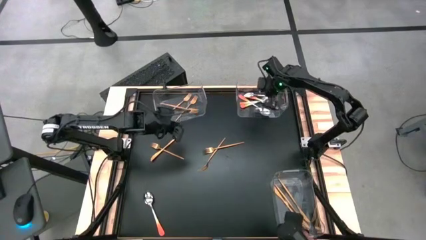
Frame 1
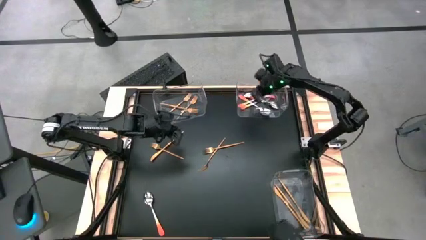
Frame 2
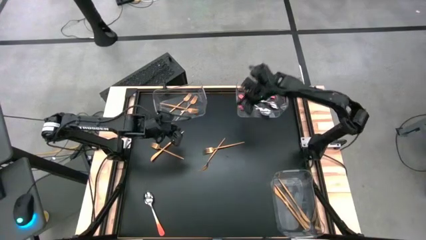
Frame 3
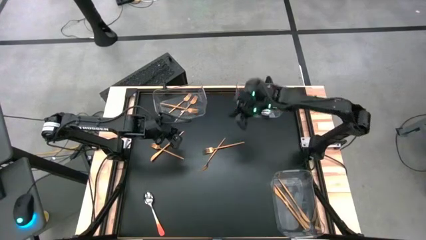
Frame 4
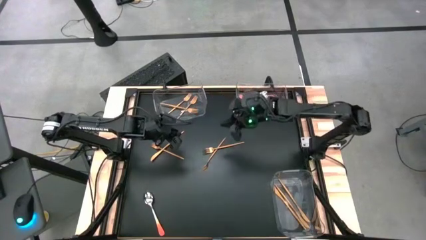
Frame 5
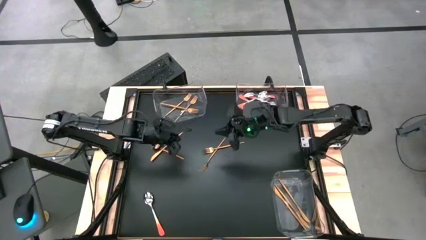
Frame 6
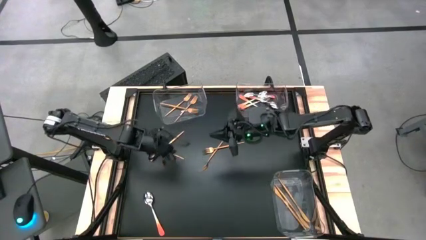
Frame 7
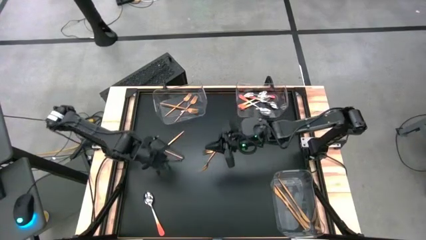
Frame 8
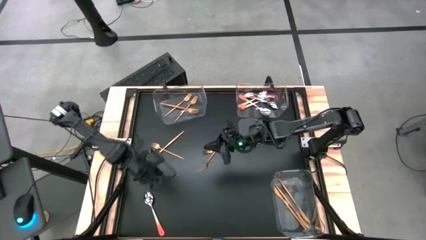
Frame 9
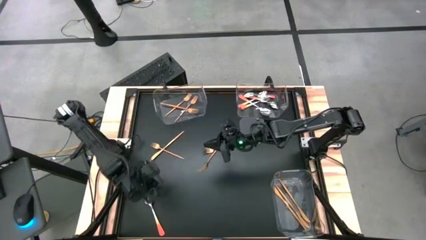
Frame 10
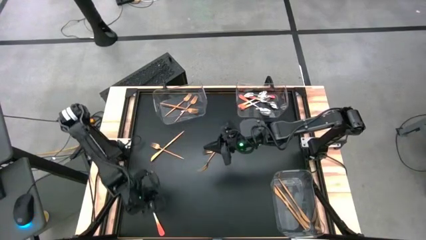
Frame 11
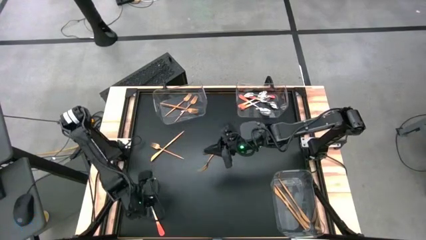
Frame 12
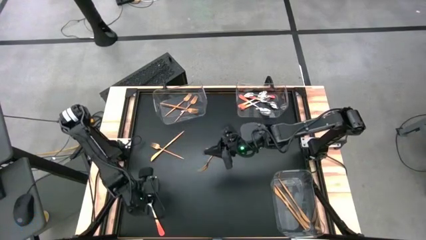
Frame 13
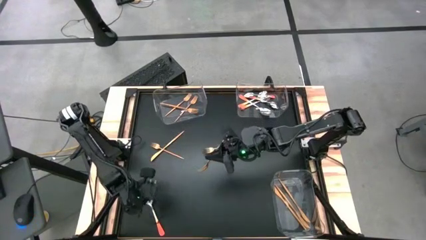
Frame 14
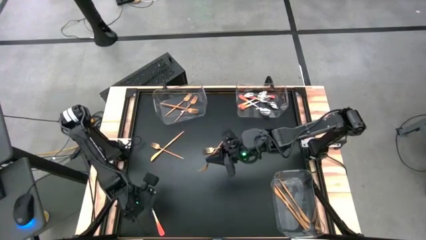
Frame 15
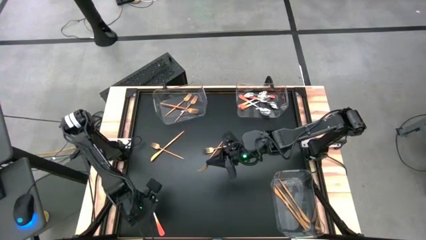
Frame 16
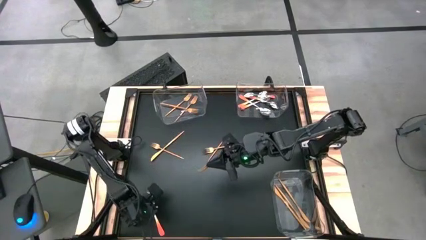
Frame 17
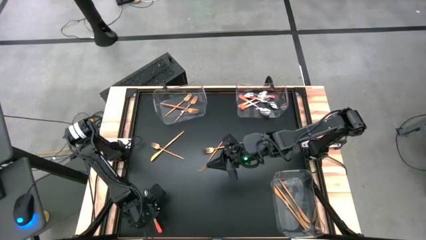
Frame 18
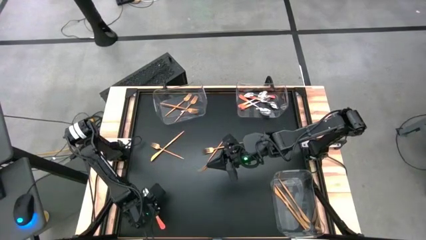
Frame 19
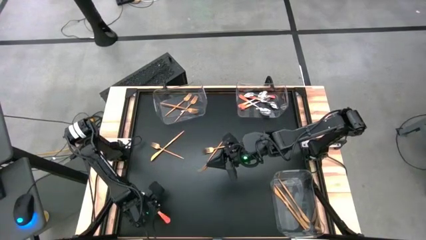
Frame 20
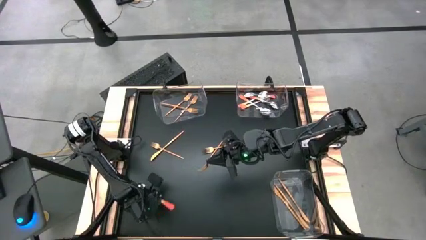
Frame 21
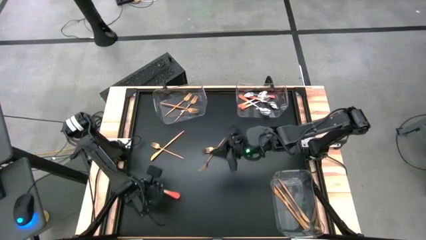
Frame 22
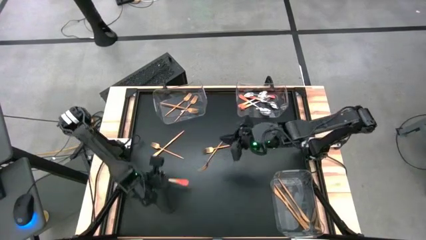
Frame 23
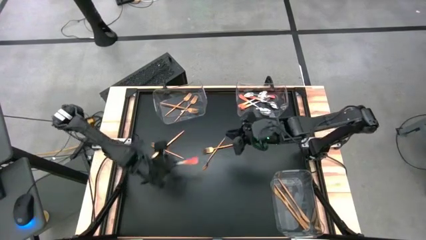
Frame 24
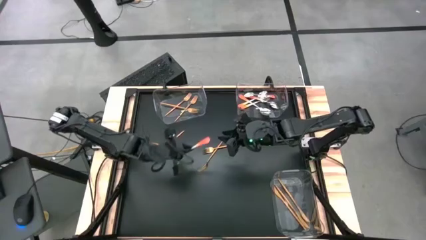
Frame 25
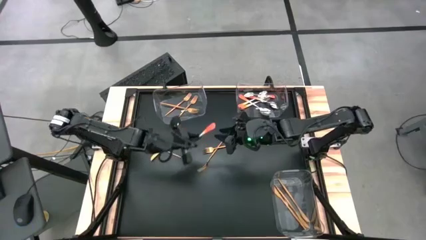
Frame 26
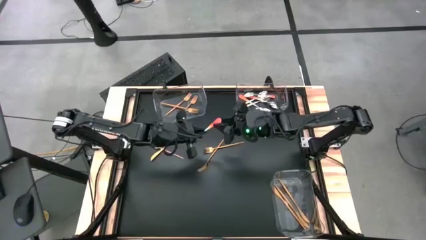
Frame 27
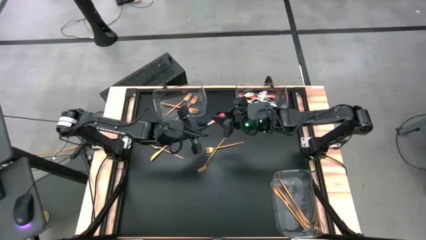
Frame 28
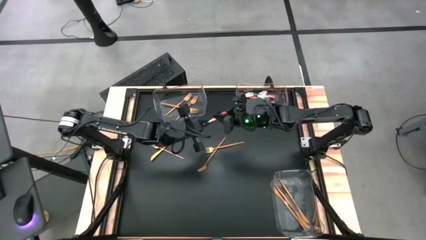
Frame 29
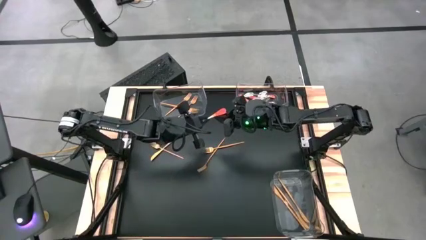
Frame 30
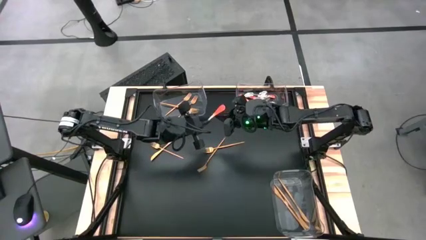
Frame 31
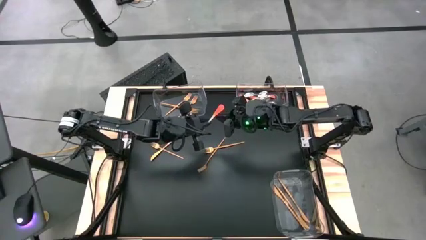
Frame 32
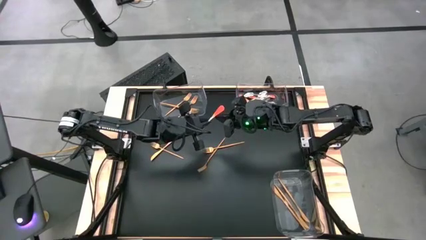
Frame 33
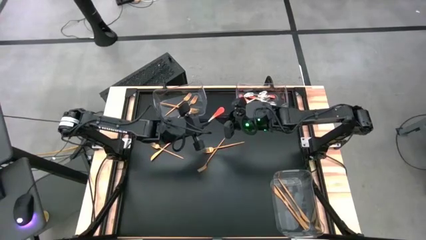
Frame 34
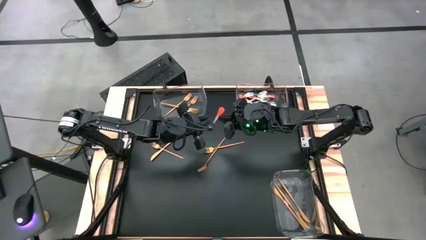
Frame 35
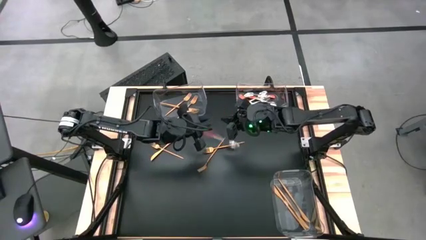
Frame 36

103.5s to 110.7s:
Task: Sort silverware by color (type)
Put the orange spoon into the top right transparent bin

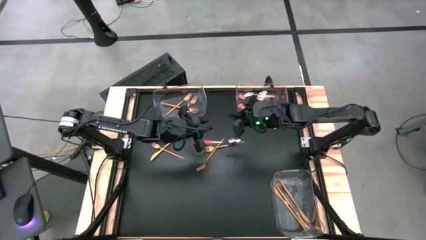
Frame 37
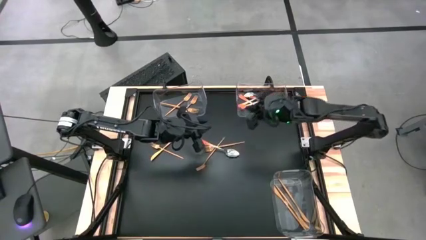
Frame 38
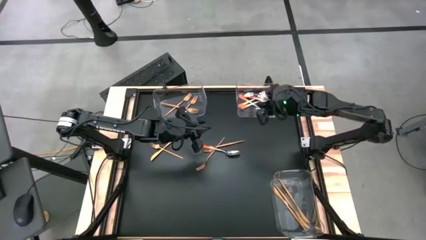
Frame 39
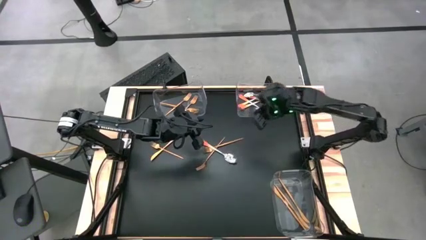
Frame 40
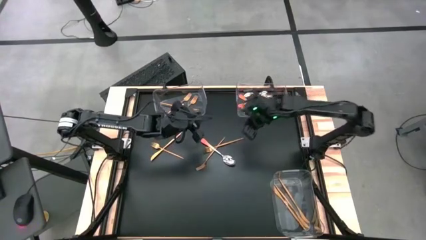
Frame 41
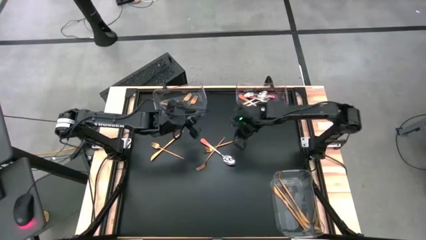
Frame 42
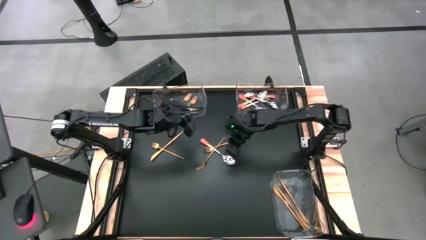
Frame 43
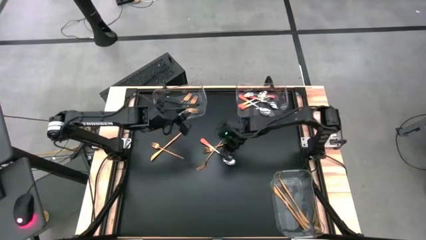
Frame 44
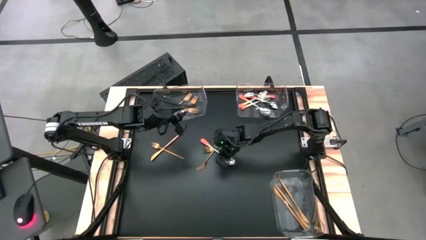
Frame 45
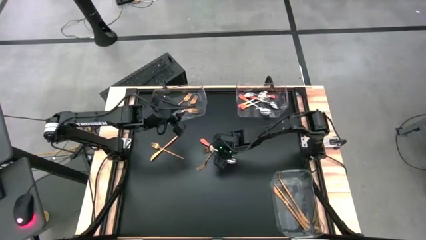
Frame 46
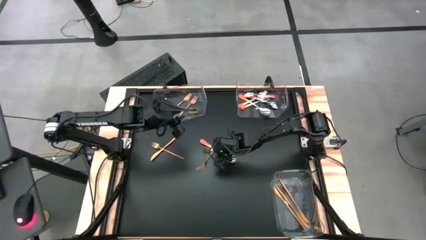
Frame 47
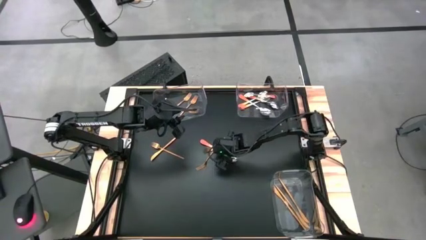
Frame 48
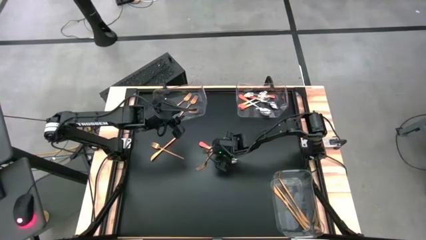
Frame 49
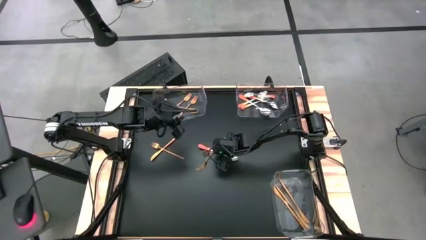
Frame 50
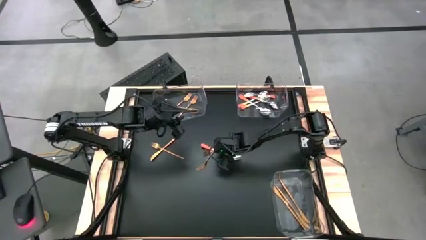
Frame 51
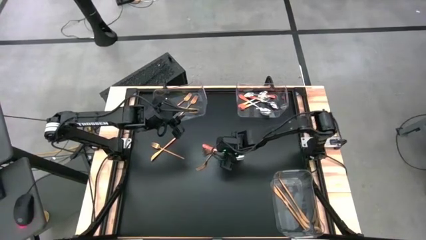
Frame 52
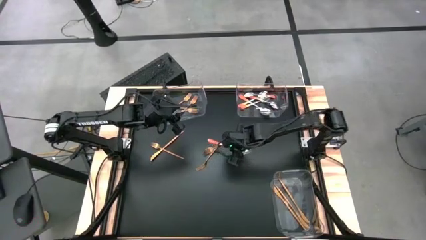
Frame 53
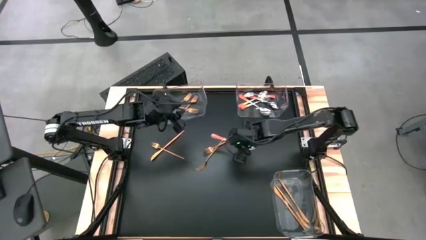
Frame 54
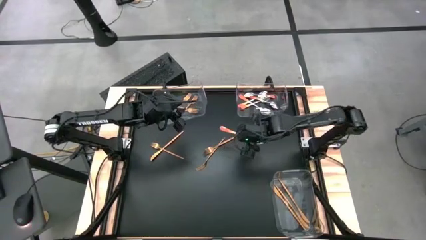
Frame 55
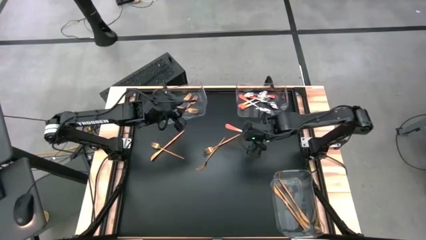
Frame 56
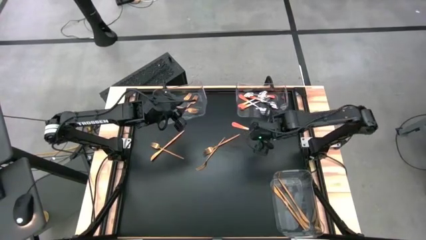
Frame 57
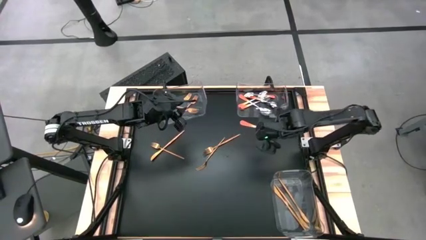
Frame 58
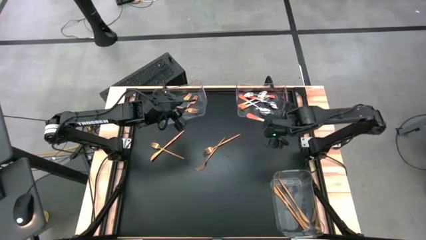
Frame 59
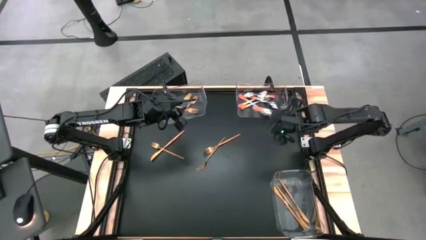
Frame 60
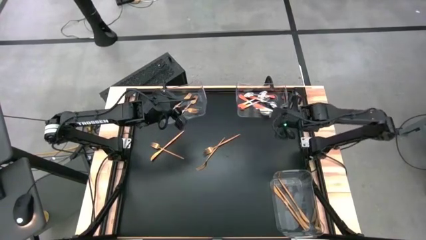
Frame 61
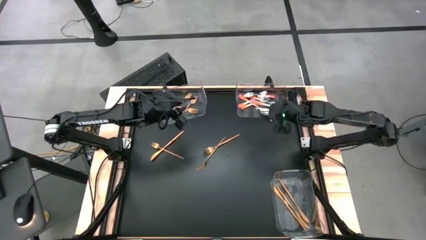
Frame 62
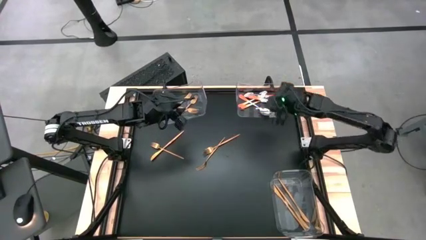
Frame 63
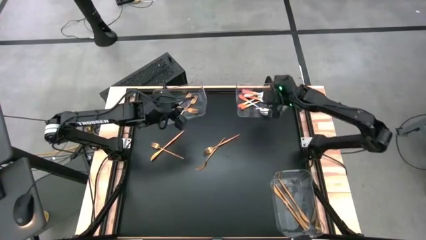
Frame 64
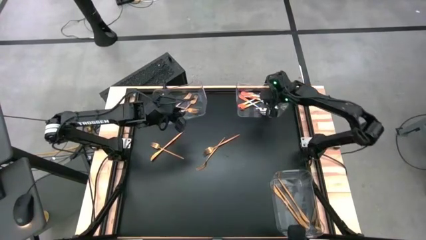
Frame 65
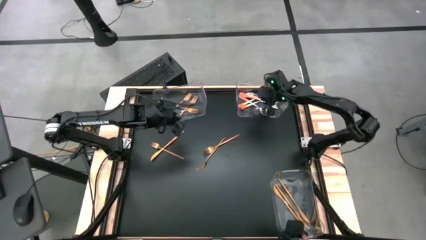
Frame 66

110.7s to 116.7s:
Put the orange spoon into the top right transparent bin

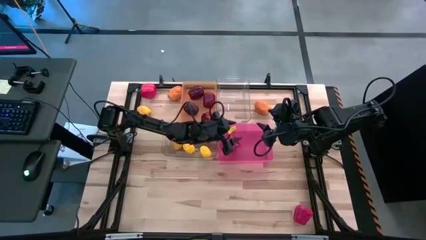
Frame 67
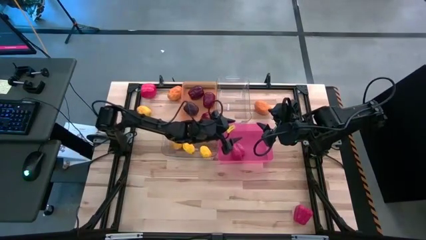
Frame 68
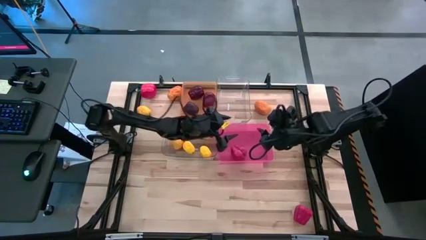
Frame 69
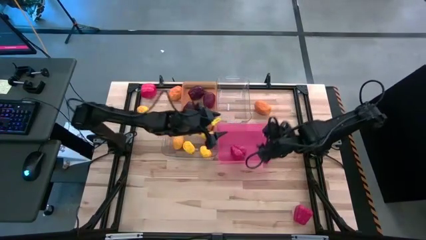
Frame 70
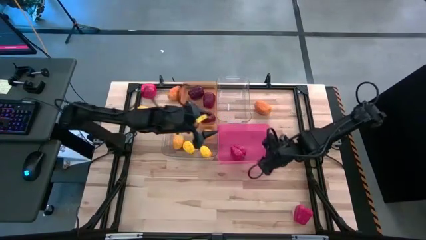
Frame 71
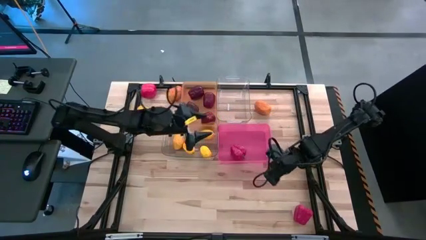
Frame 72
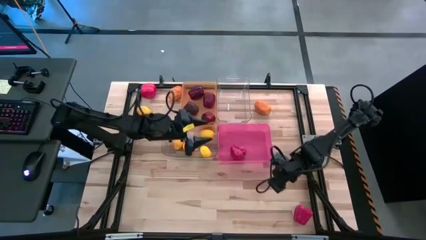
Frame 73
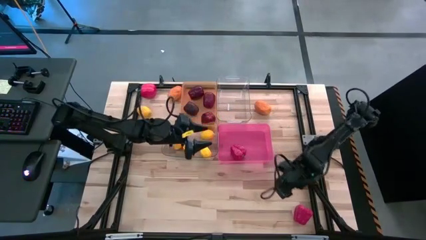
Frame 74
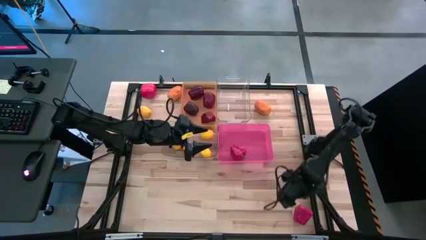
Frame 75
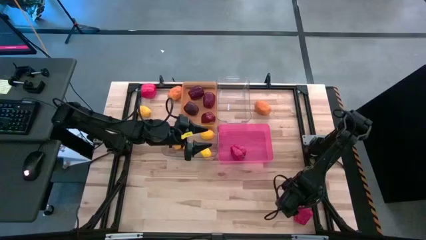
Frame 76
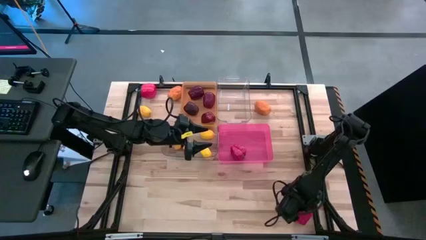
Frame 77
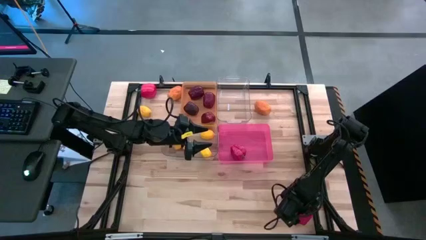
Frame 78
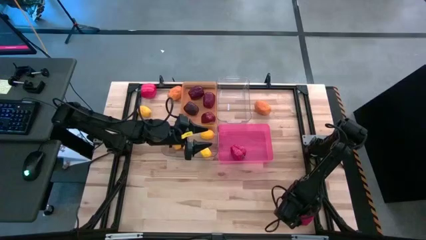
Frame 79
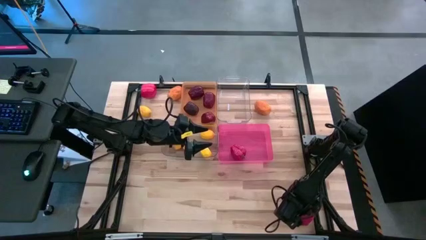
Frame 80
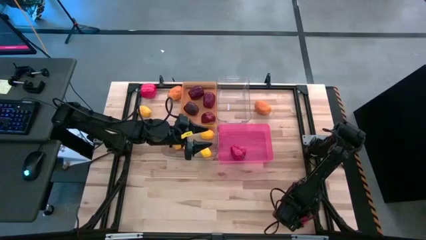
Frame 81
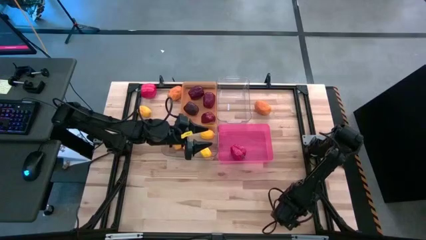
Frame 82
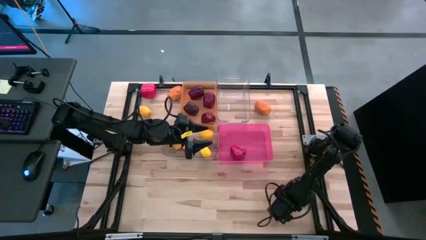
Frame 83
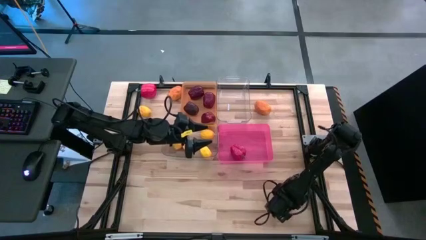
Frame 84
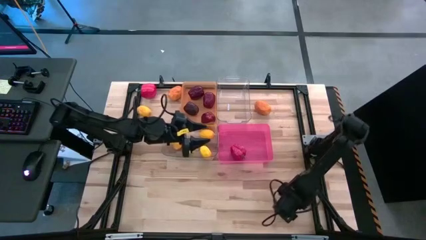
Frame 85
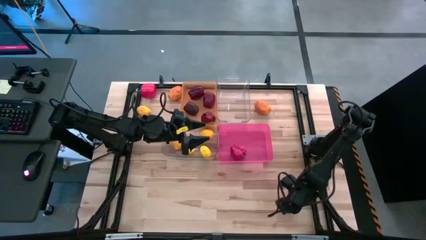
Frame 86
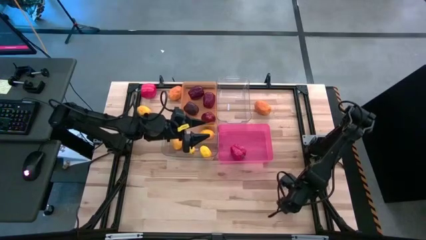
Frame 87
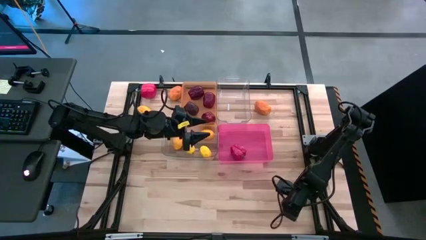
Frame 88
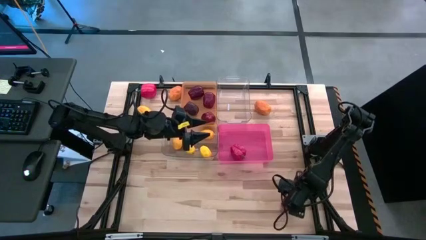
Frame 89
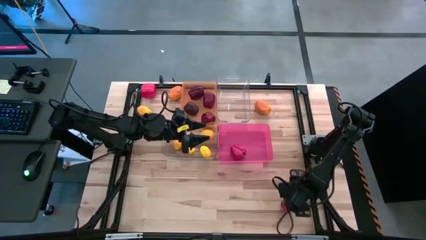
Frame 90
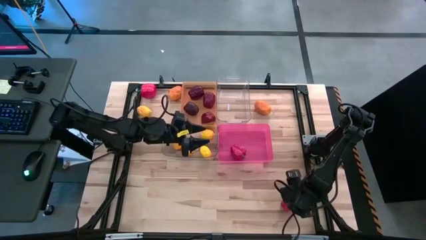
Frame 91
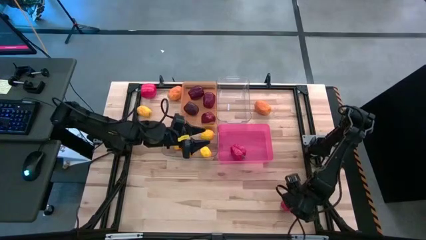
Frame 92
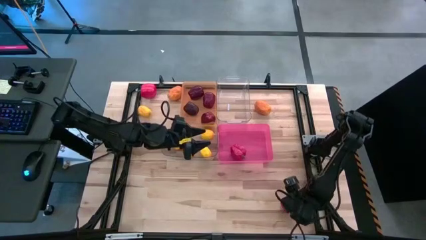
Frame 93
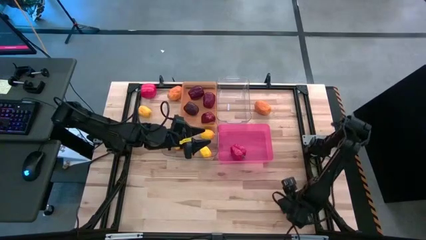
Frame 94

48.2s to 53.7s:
Task: Sort produce into baskets
Put the red bell pepper into the red bin
